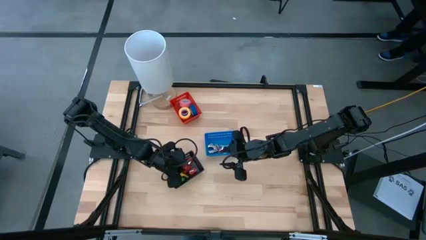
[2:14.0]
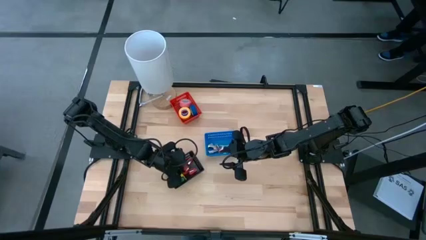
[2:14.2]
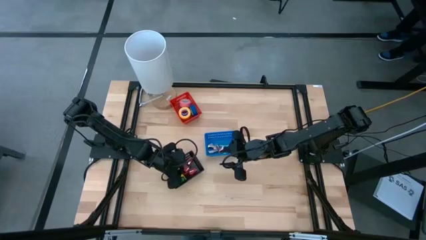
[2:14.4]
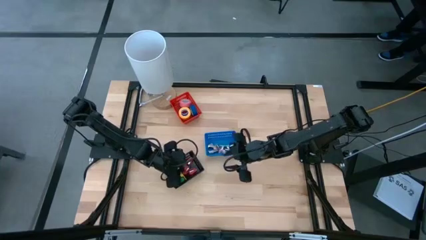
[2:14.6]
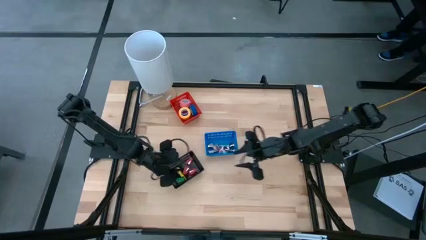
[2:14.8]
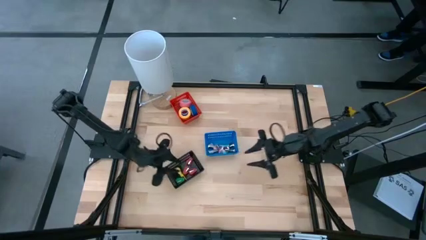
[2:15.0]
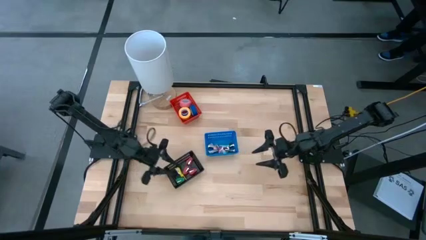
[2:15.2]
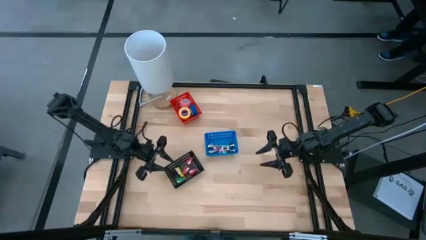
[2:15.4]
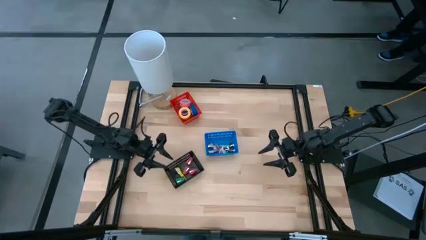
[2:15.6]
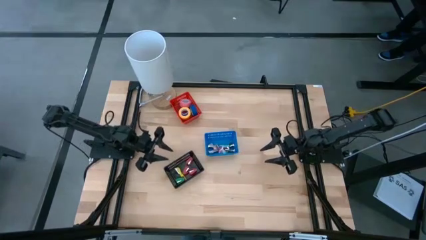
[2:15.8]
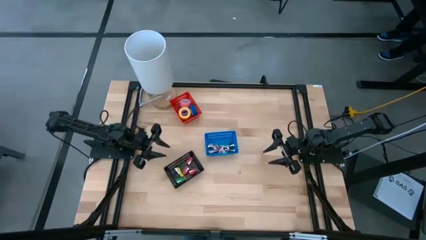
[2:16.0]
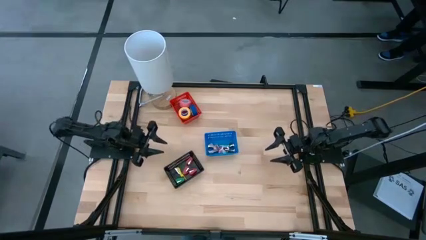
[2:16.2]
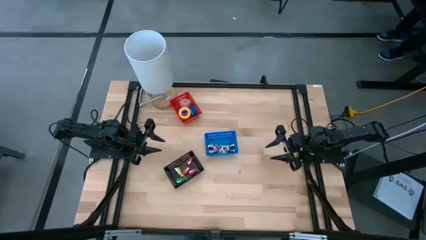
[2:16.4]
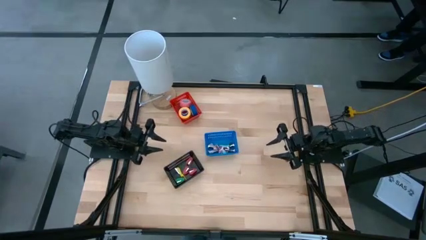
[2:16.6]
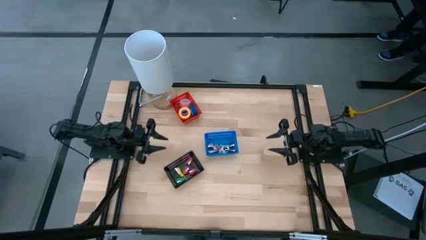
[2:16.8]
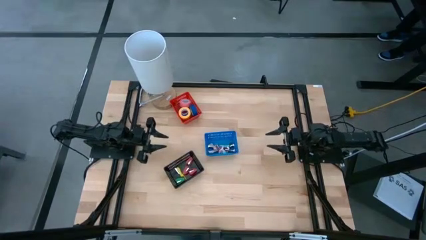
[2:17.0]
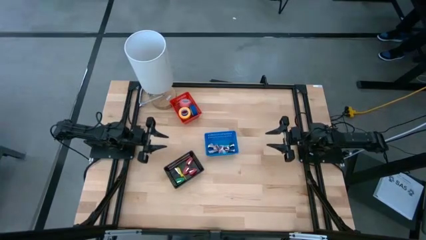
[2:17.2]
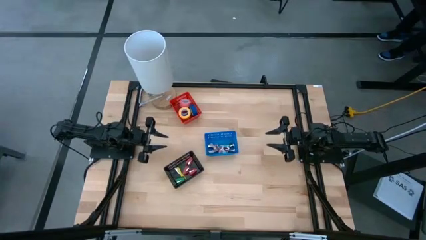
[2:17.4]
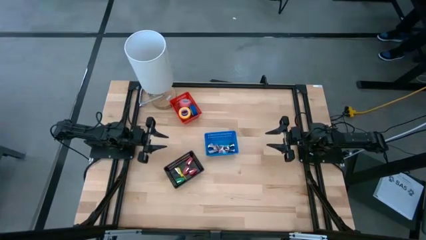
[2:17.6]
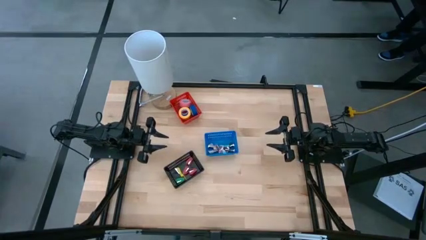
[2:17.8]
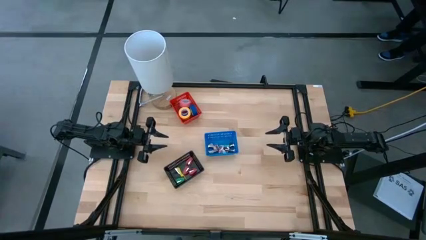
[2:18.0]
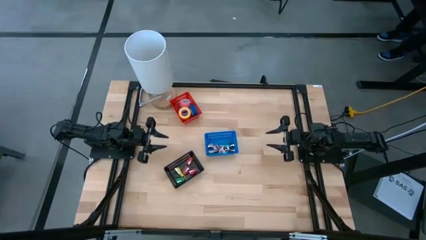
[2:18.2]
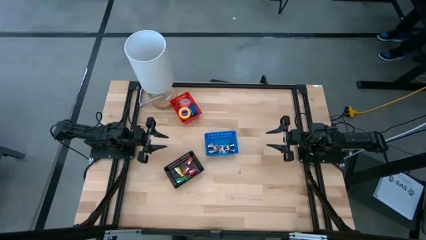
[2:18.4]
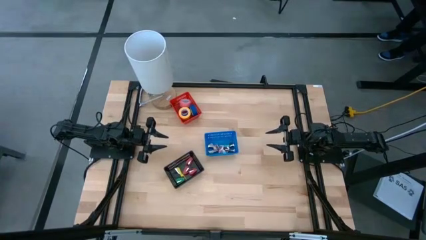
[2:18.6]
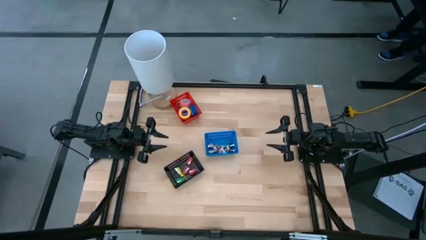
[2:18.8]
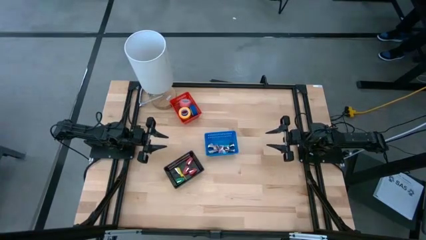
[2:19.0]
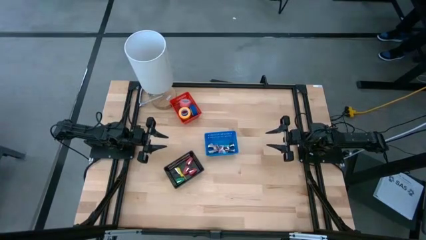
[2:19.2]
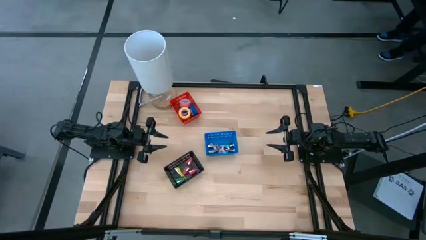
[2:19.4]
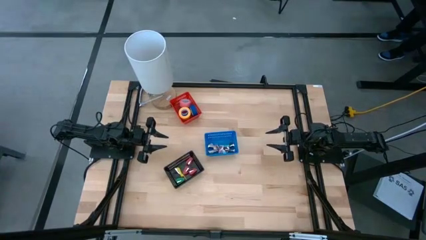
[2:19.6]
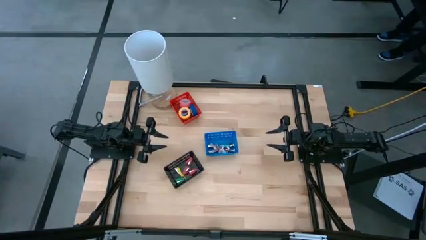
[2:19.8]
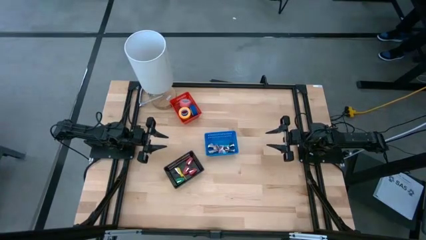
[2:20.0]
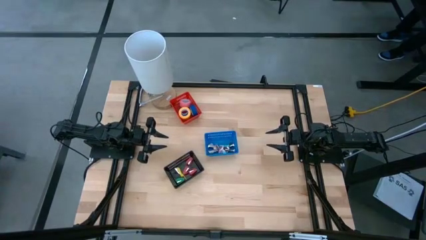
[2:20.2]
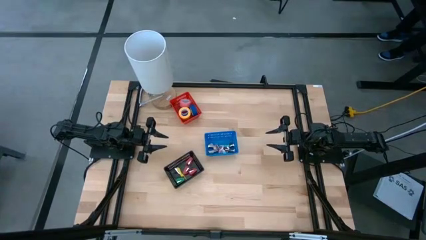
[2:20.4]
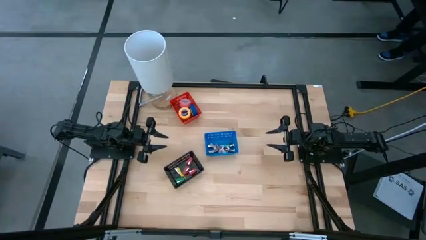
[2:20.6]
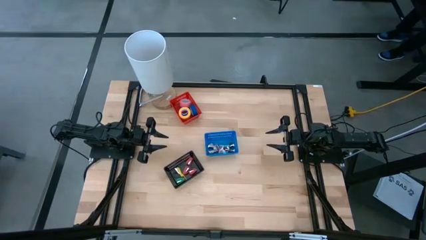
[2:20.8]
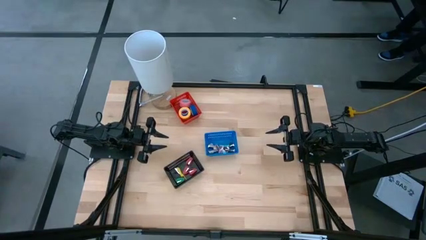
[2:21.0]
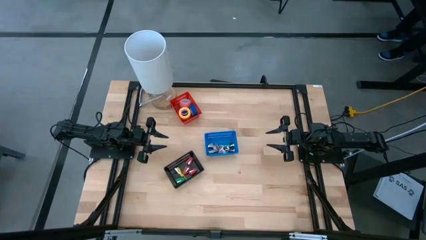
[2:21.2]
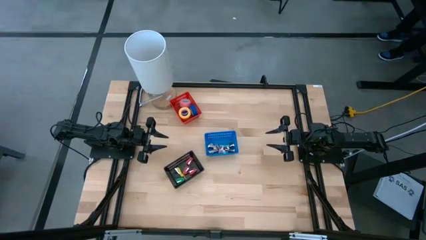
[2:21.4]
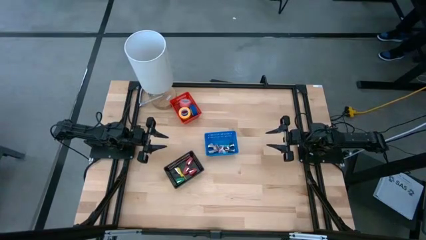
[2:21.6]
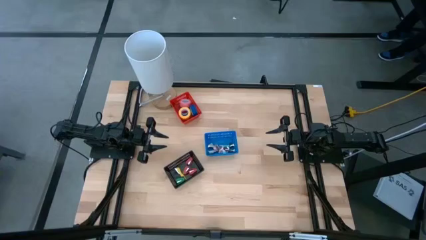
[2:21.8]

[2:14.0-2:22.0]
Task: Pick and place Stapler, Stapler remover, tape
Return to Home Position

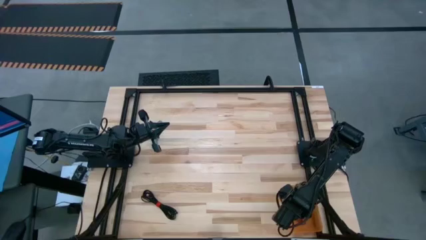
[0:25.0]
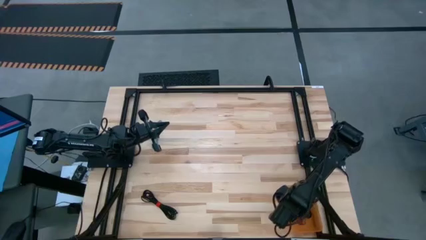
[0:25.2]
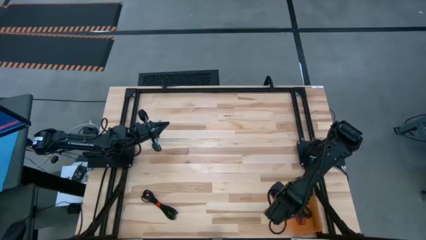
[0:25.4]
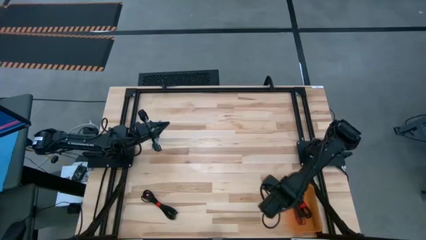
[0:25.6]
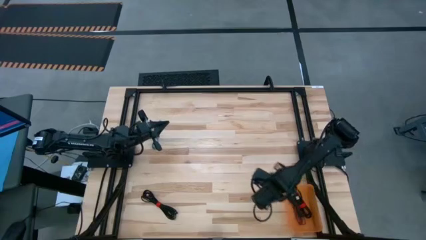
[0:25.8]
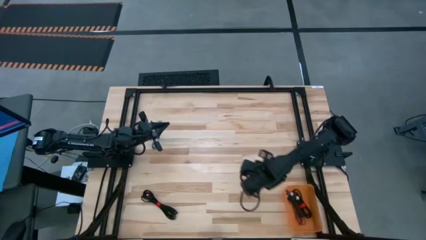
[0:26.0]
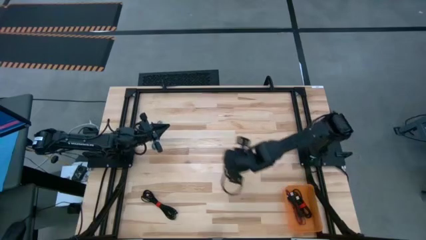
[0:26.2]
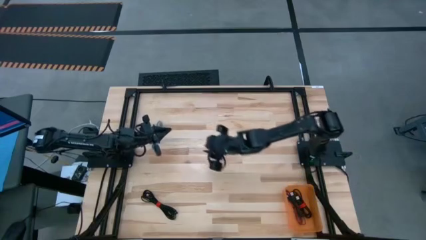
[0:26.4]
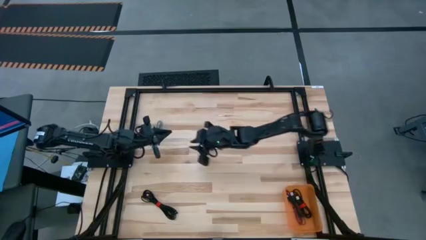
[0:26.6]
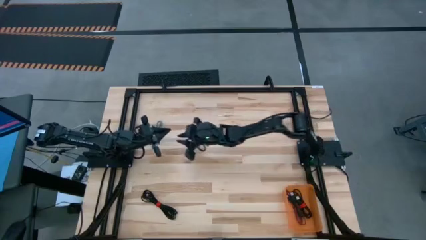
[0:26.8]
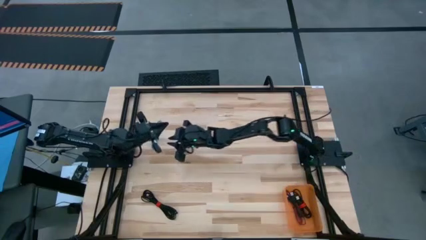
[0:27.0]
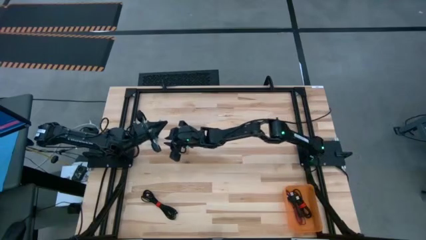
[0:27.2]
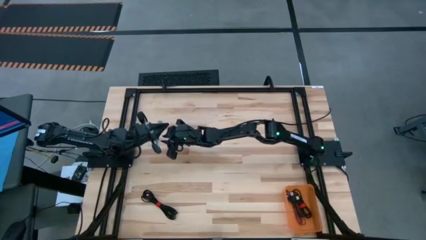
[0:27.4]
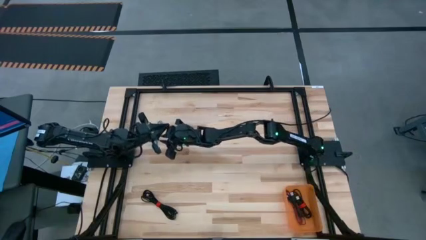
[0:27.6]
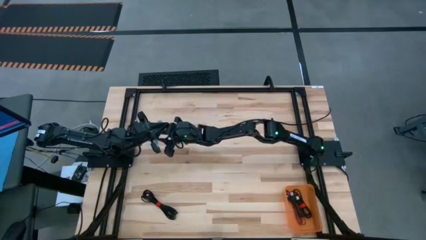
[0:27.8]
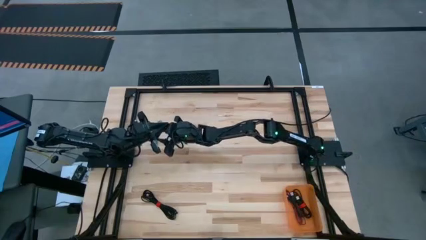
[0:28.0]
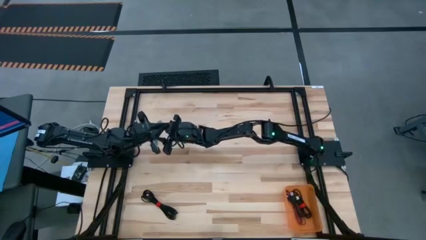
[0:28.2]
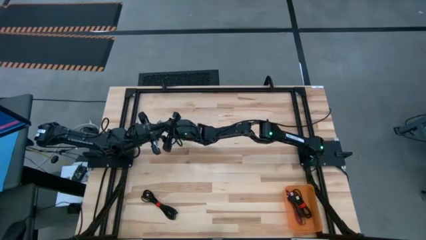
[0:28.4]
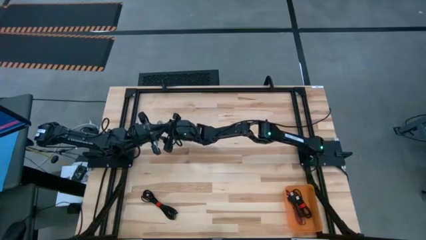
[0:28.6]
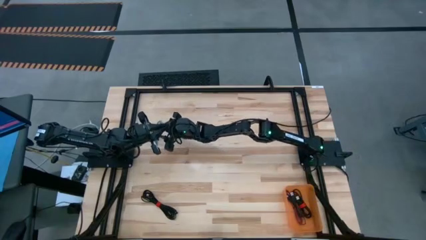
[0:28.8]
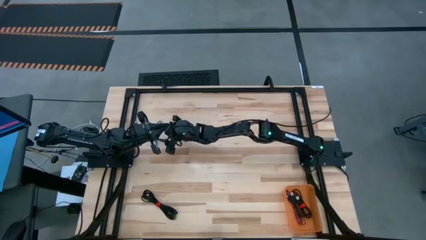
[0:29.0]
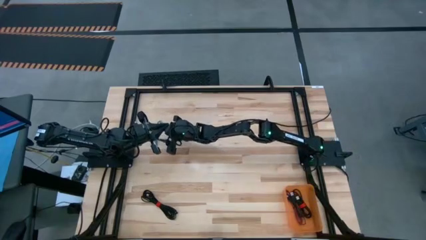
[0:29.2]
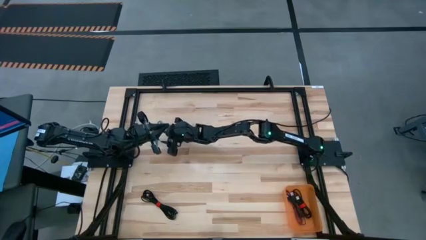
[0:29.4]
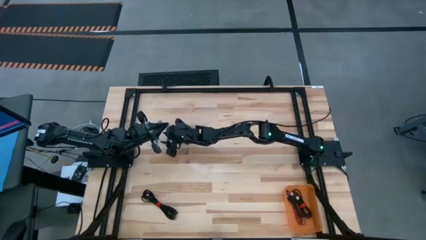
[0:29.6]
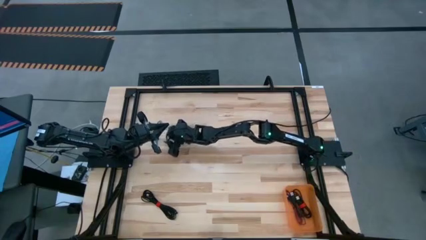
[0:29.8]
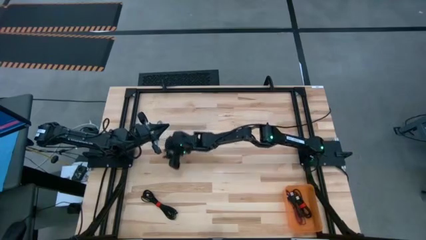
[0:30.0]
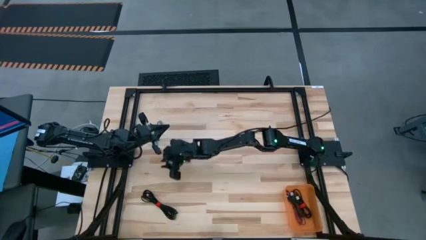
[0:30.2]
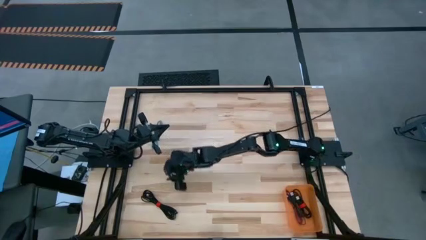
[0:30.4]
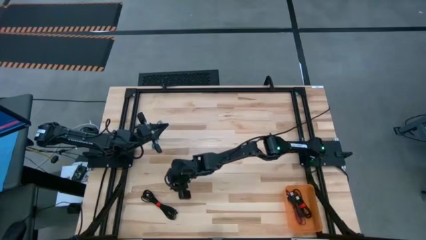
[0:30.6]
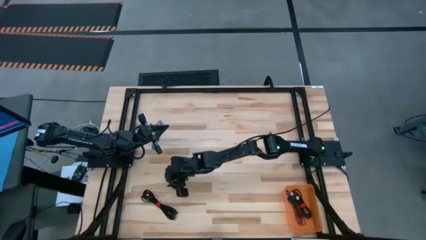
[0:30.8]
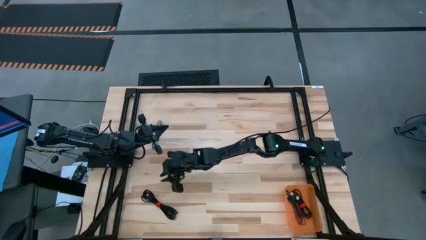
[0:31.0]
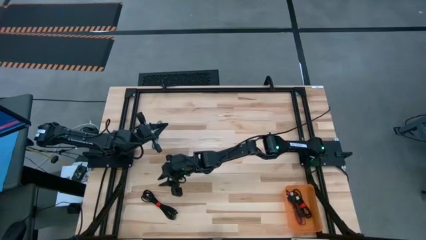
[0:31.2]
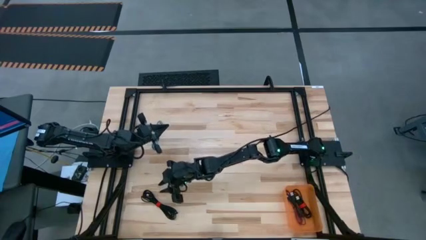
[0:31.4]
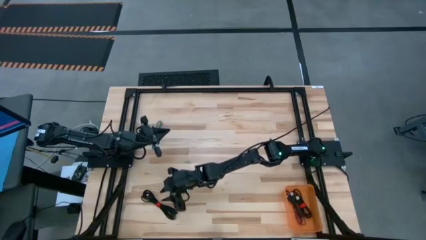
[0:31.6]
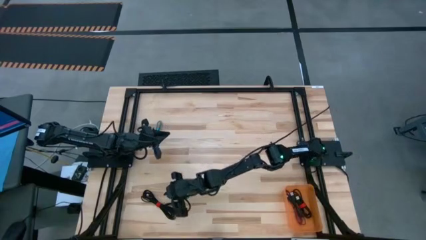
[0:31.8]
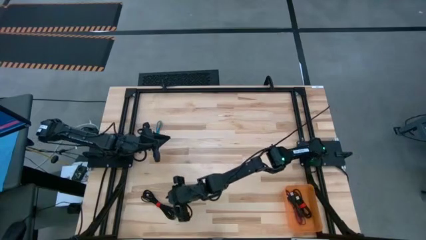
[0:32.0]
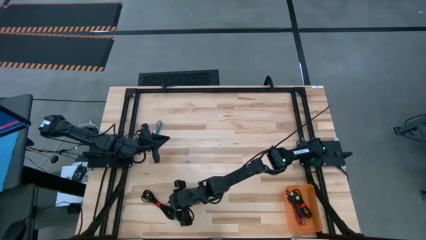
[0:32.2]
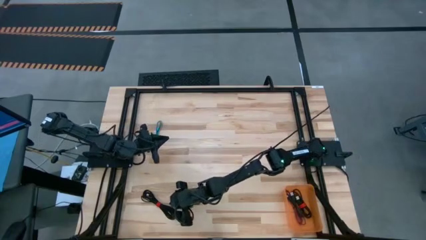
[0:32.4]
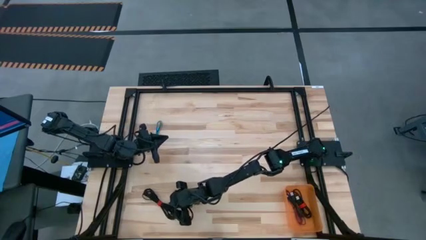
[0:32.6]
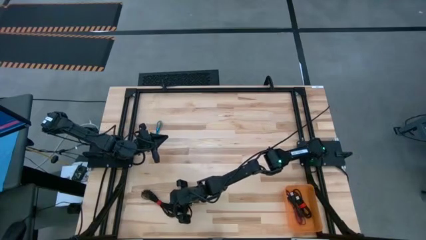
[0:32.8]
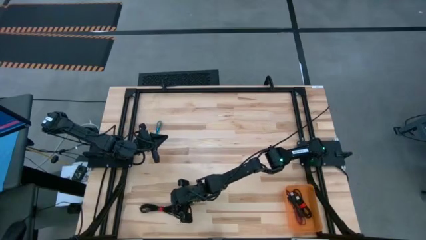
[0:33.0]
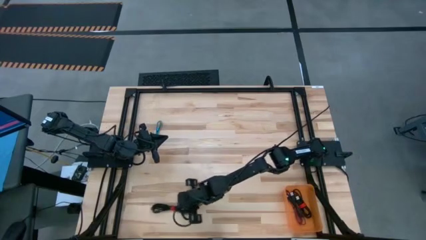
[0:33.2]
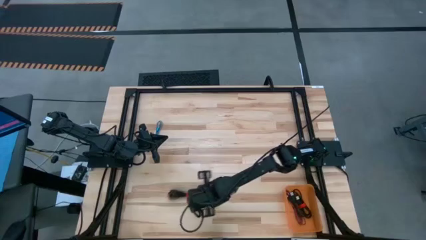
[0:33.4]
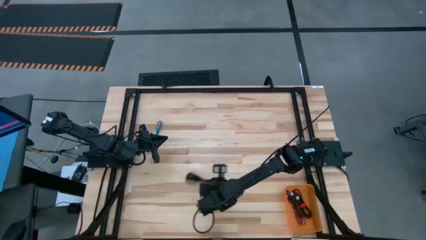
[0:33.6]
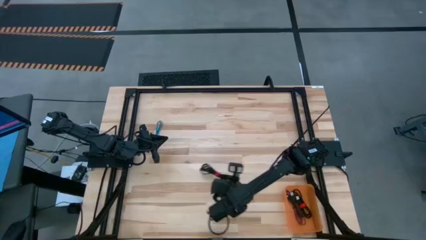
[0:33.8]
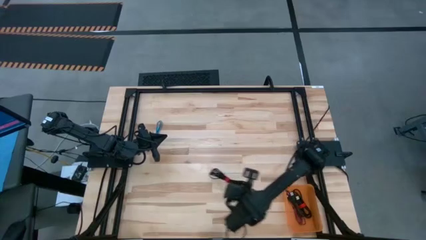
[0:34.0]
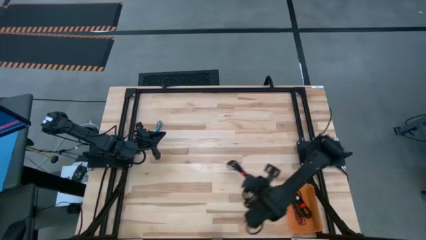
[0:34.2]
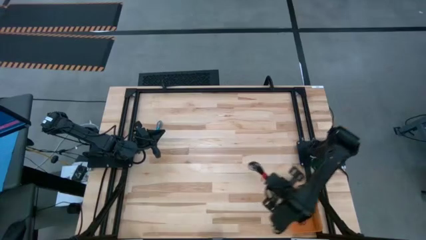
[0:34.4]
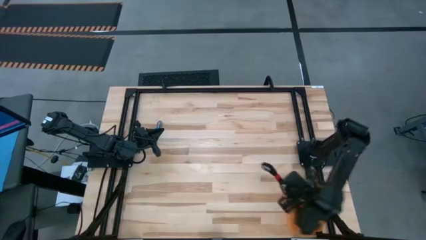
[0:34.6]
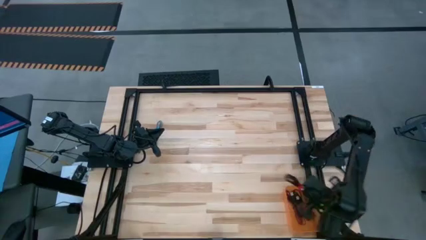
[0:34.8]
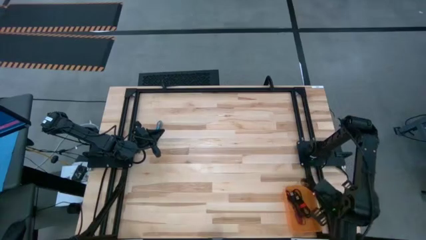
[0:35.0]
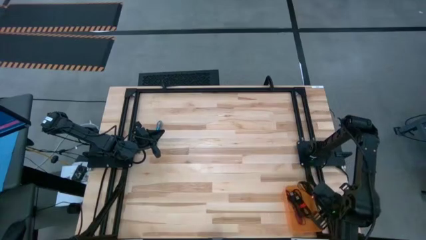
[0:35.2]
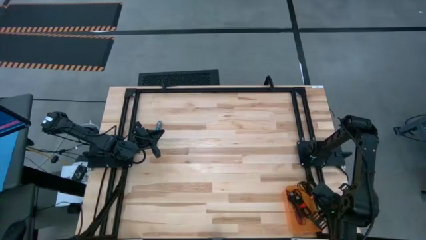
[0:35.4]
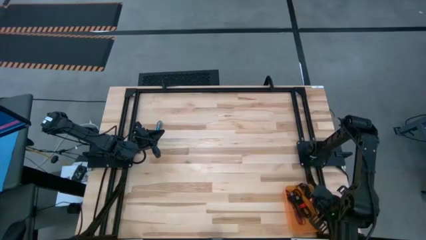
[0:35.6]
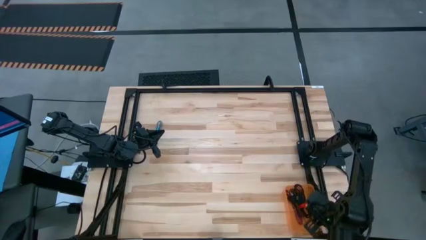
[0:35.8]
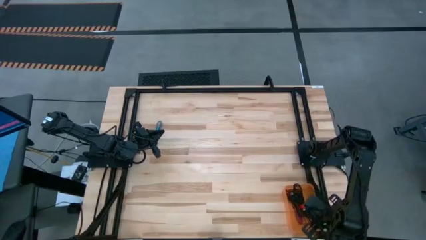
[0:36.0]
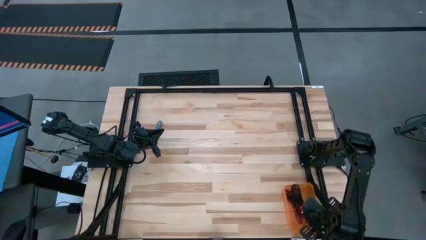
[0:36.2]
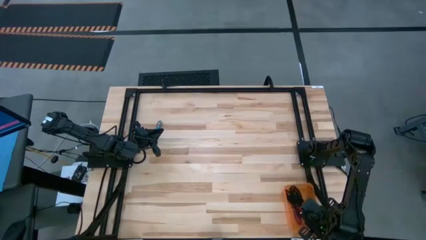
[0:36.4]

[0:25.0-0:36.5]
Task: Pick and place USB-C Cables
Put the black charger cable into the orange bin
